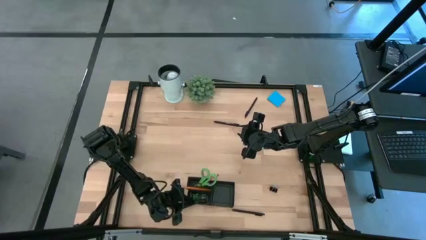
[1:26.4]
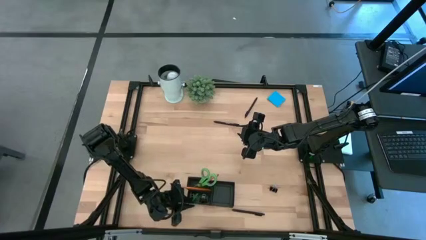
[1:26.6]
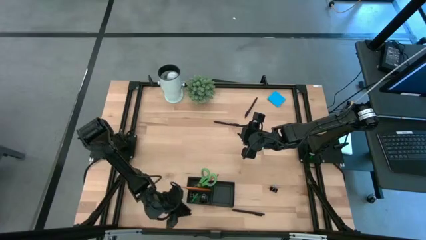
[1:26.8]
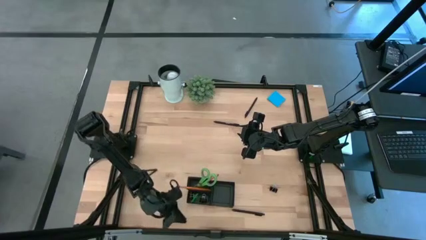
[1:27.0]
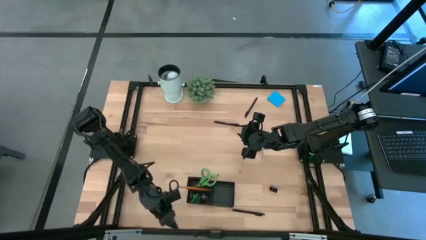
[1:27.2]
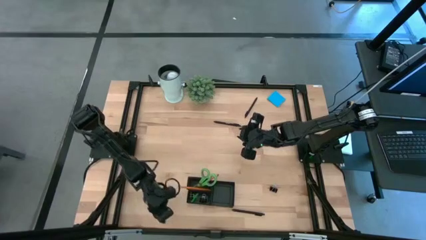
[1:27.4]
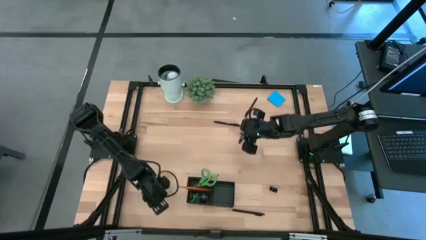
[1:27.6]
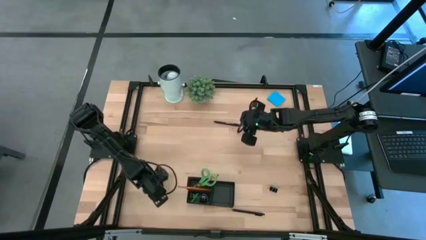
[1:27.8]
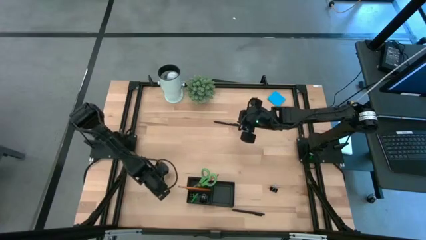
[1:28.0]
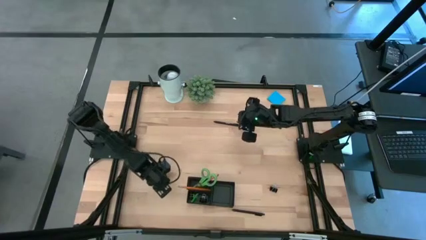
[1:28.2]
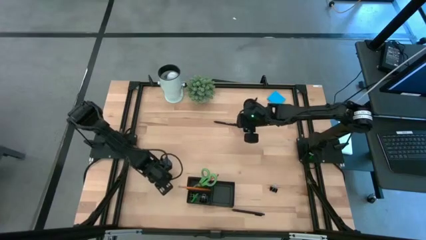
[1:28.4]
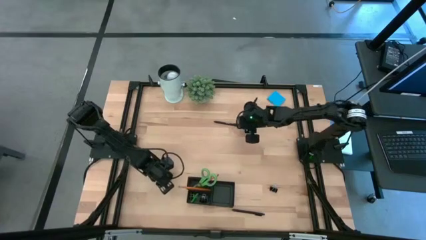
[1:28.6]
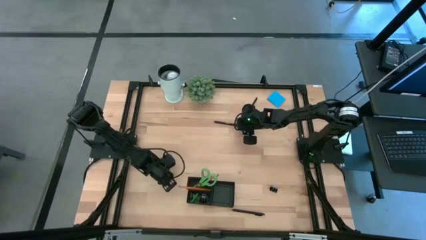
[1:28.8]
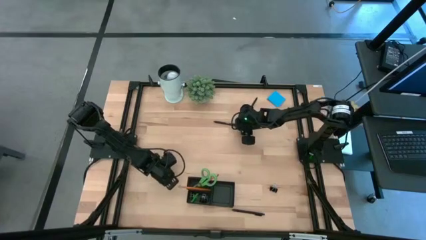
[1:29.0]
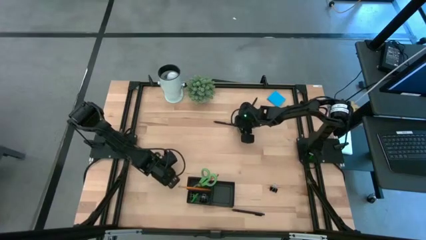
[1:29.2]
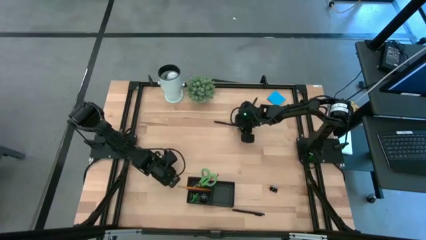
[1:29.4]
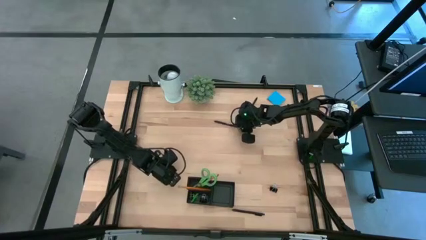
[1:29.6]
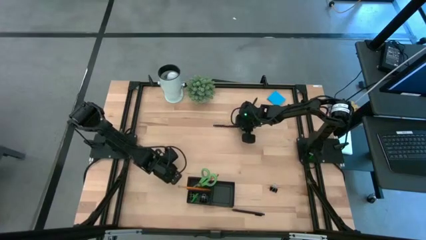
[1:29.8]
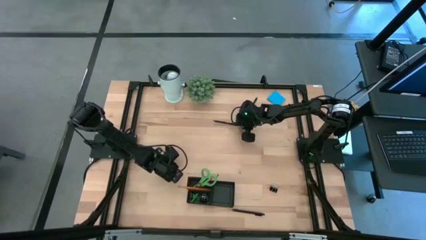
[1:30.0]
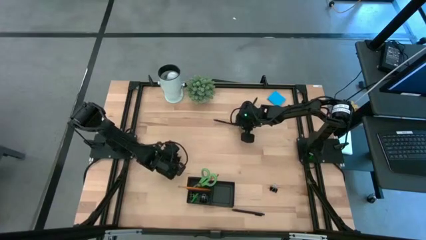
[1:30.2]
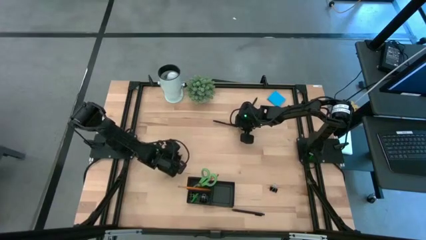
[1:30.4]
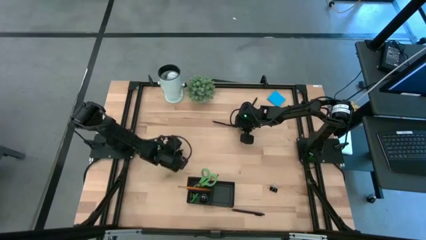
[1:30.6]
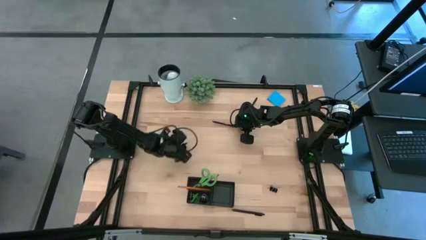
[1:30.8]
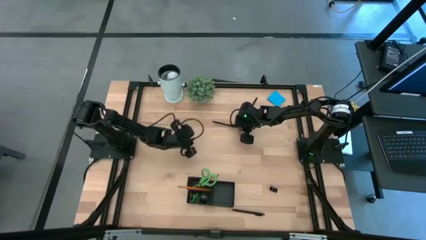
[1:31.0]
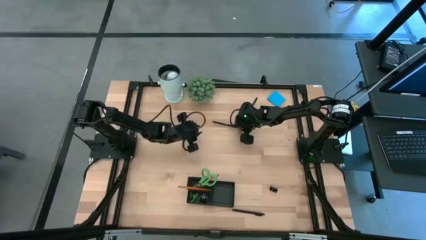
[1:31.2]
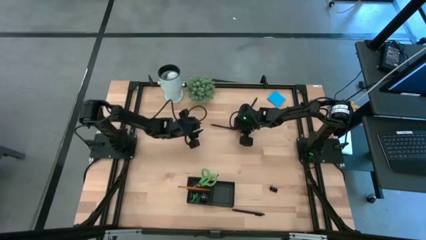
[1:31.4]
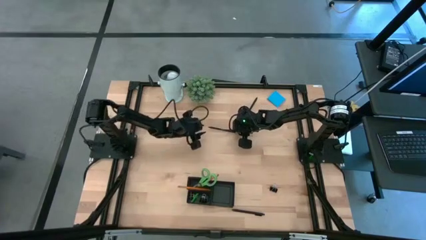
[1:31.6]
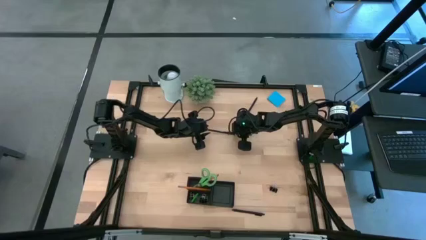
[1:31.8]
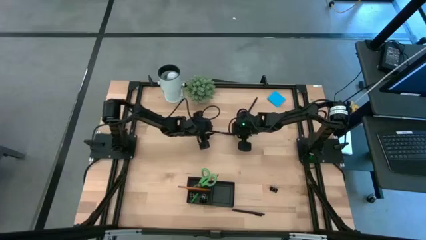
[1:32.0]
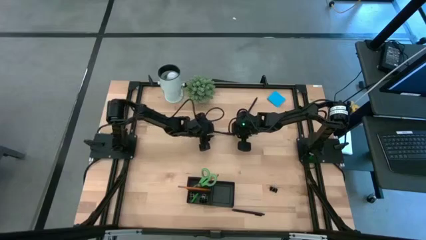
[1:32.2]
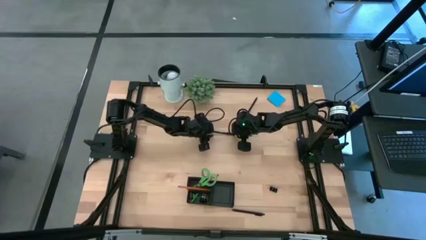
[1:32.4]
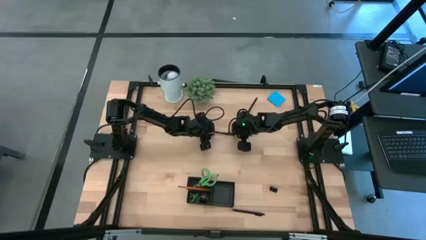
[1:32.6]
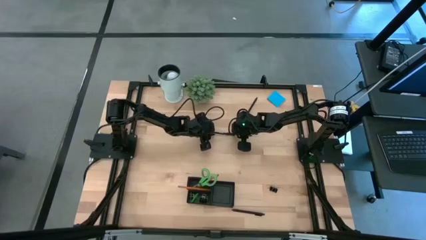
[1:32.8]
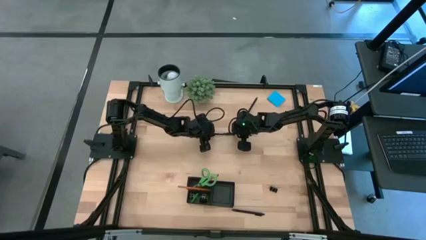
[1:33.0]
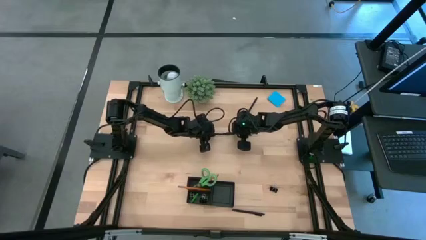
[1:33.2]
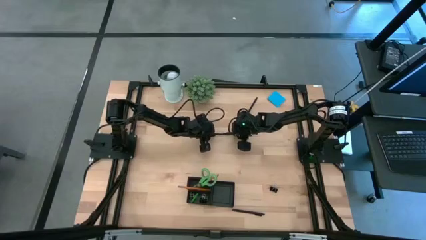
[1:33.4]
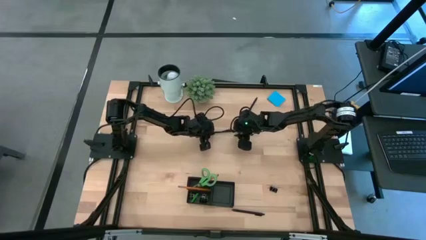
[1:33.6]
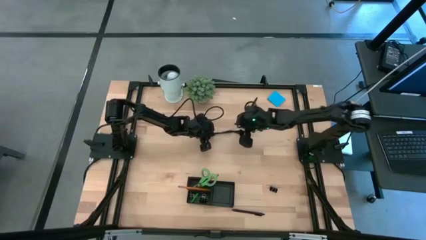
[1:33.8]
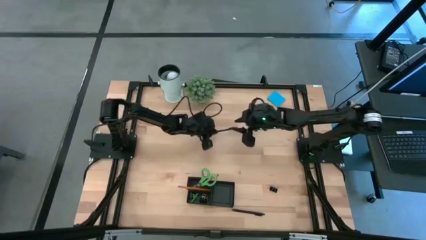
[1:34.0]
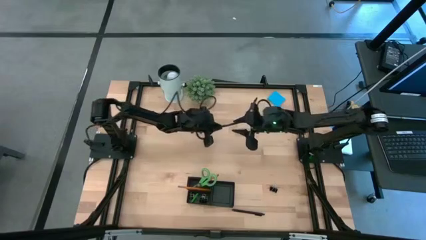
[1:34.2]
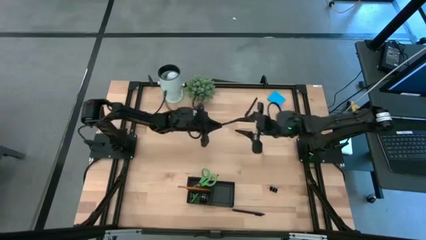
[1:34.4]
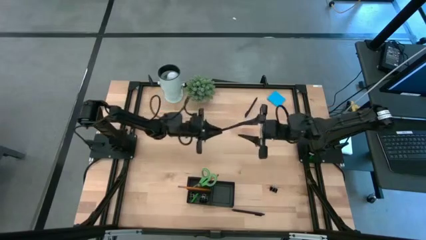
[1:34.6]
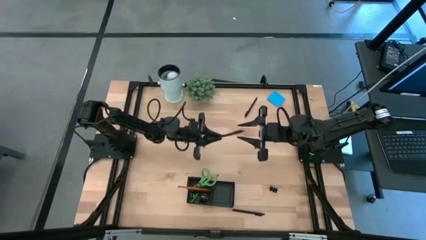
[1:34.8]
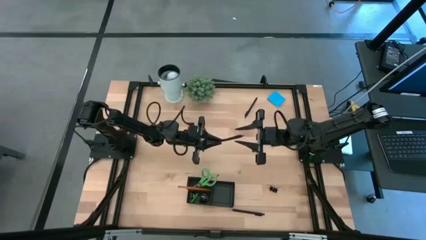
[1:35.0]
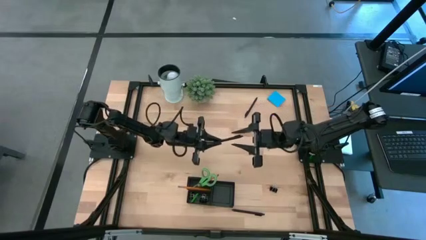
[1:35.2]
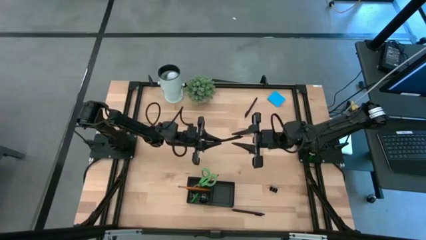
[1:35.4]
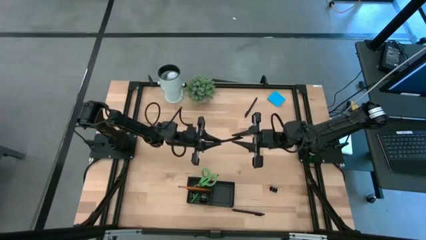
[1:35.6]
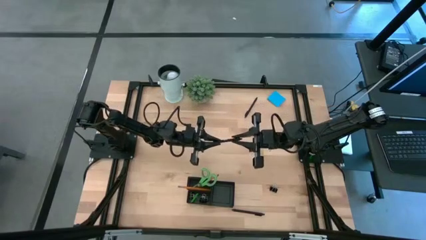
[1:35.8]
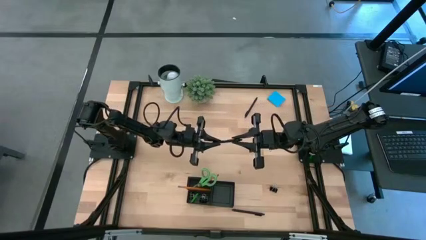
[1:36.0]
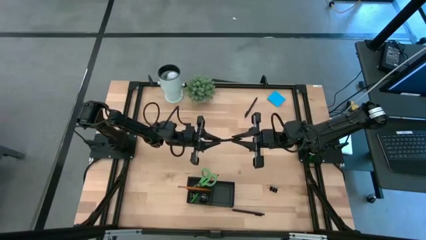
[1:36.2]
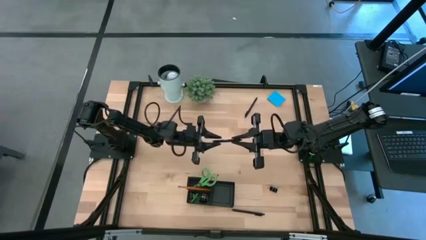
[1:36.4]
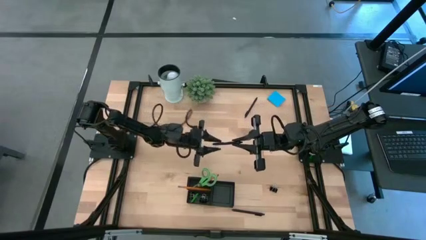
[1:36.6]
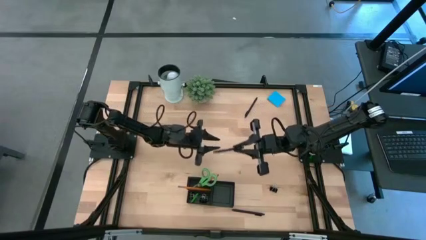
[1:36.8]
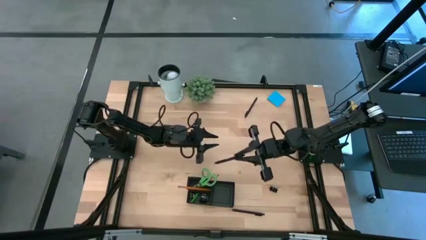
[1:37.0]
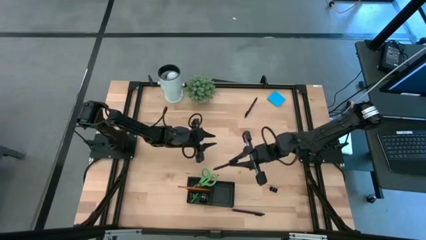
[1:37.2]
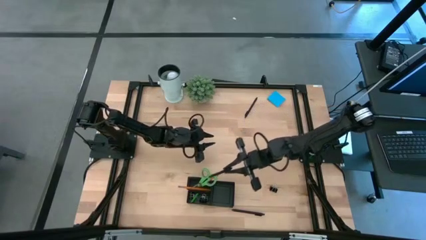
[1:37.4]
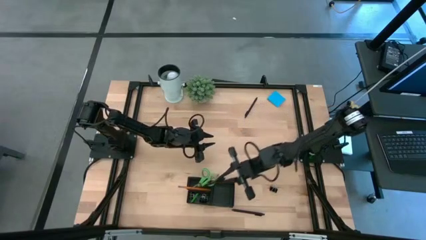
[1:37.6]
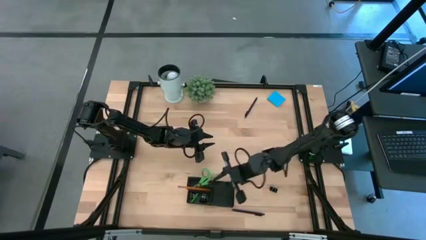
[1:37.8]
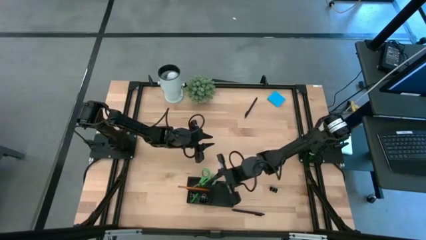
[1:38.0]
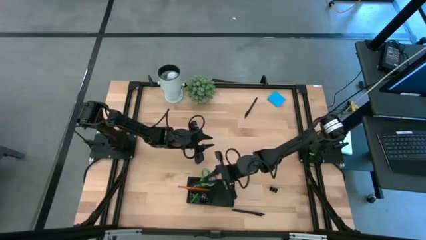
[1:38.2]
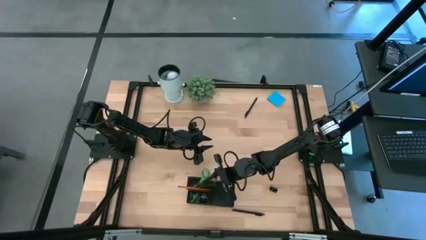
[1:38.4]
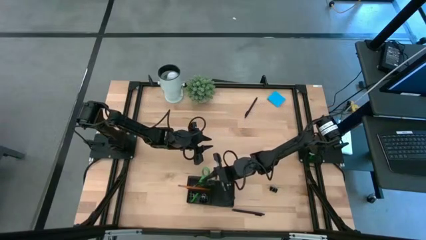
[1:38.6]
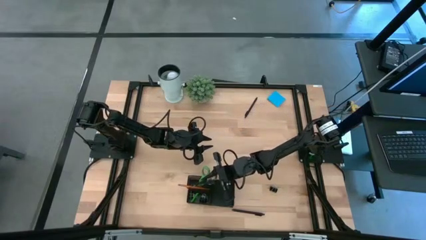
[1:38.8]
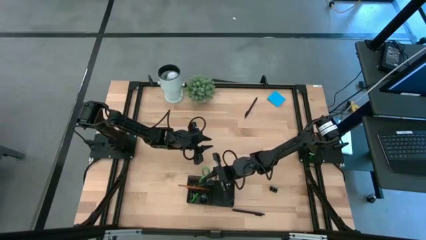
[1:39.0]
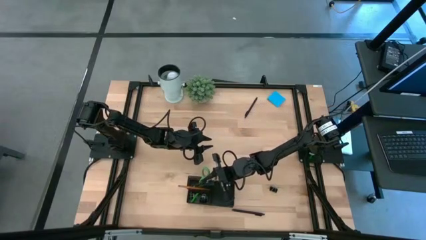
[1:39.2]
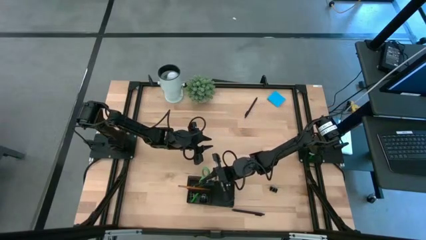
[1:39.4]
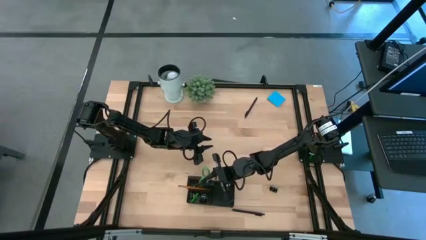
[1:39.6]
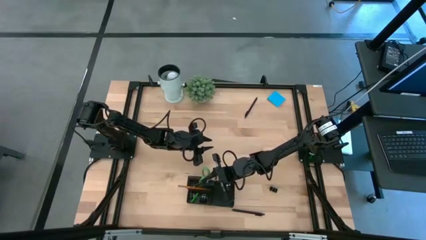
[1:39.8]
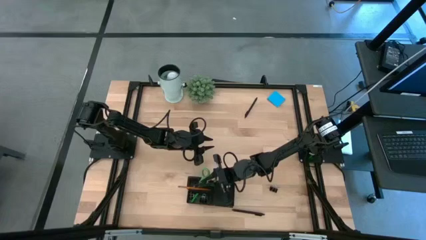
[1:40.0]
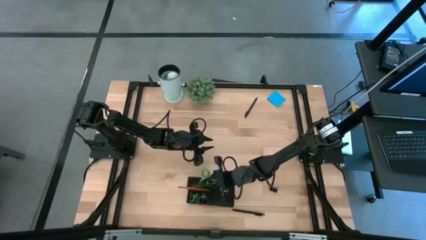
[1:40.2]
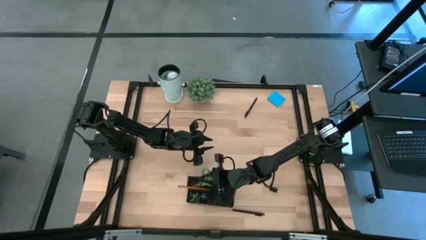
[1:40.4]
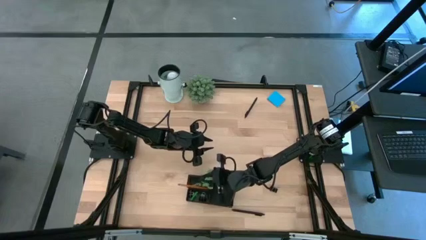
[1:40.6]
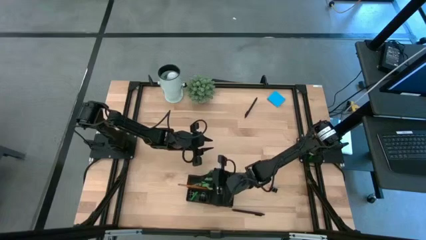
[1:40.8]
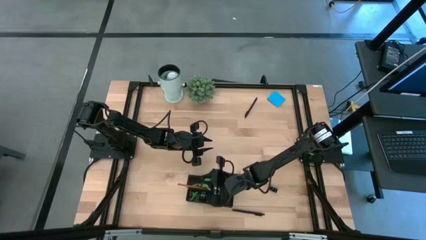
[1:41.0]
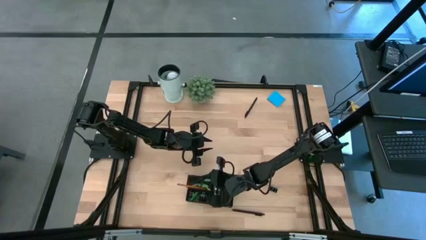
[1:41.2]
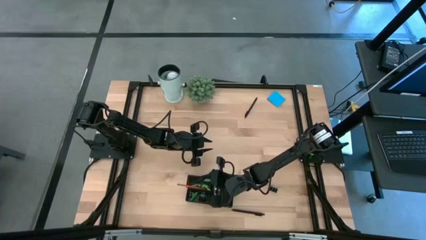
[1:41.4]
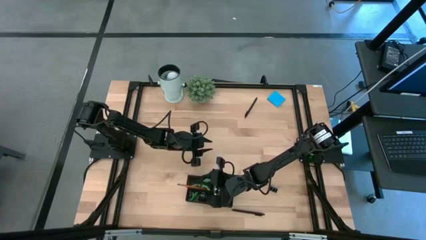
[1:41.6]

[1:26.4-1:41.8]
Task: Pick and place office supplies into organizer
Put the middle black pen into the black desk organizer
